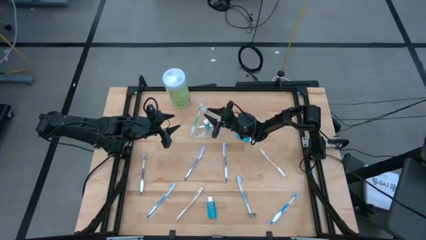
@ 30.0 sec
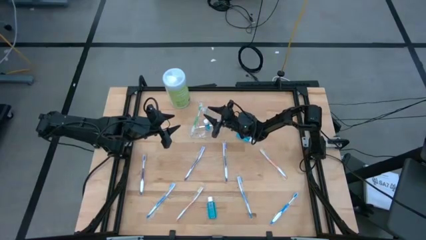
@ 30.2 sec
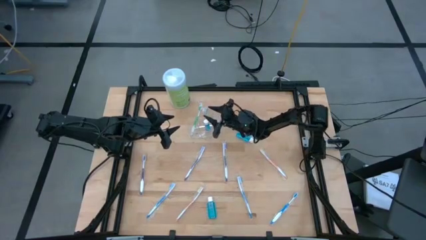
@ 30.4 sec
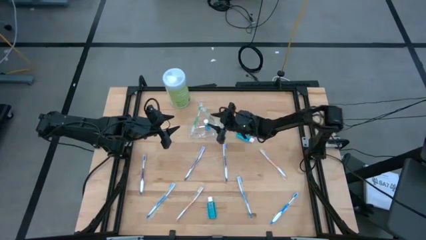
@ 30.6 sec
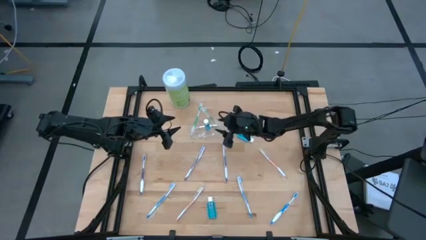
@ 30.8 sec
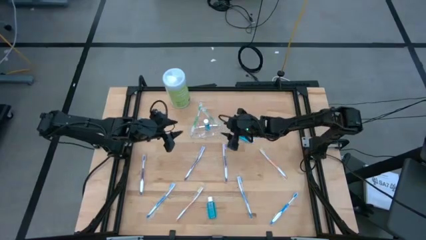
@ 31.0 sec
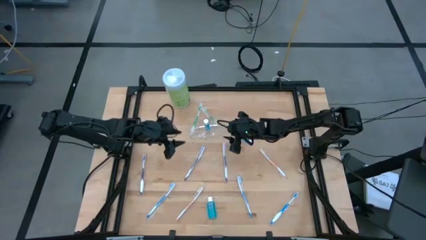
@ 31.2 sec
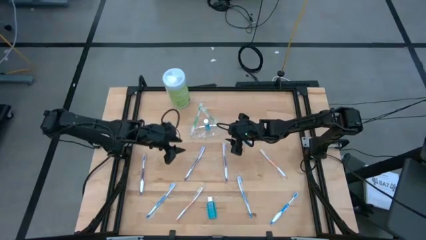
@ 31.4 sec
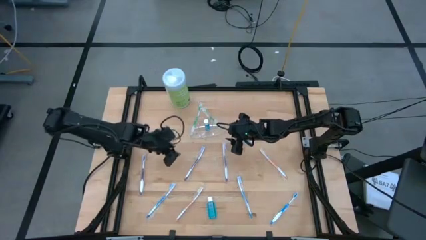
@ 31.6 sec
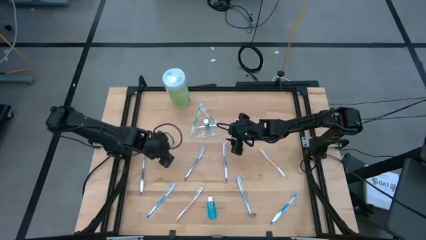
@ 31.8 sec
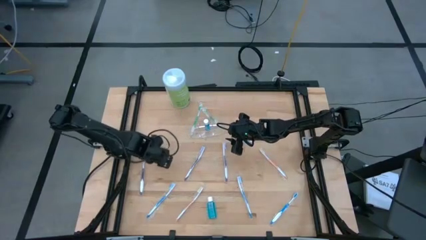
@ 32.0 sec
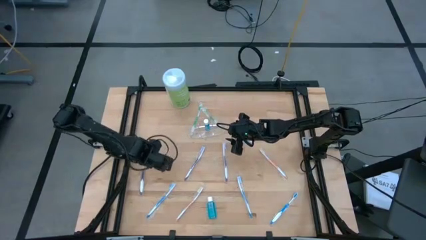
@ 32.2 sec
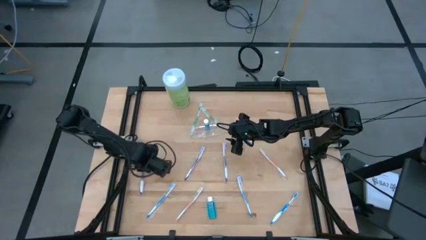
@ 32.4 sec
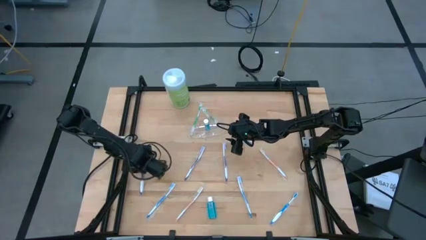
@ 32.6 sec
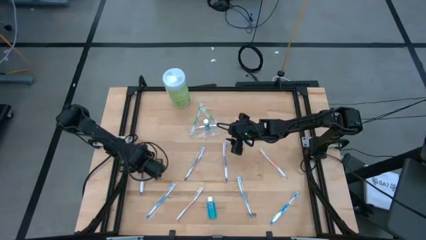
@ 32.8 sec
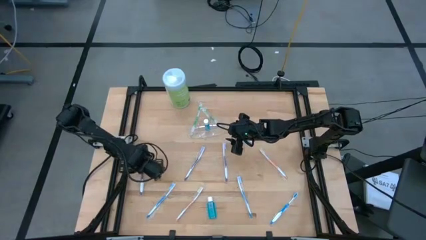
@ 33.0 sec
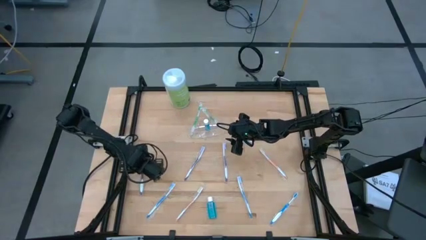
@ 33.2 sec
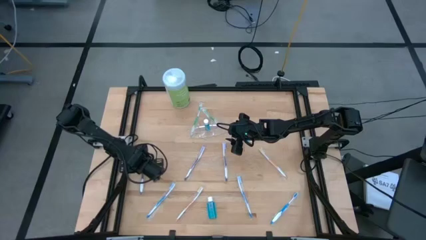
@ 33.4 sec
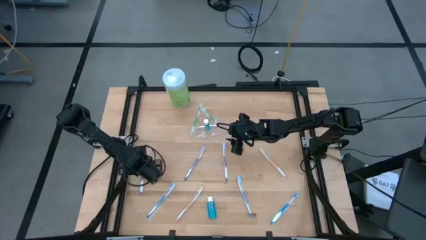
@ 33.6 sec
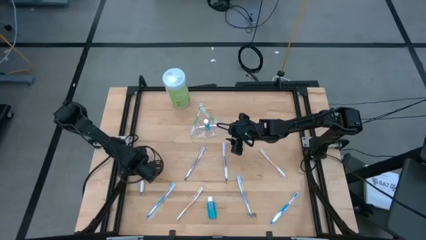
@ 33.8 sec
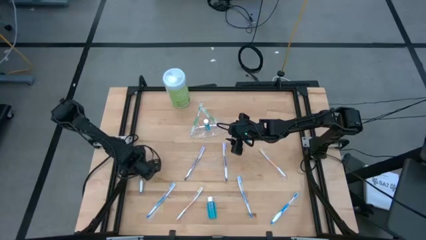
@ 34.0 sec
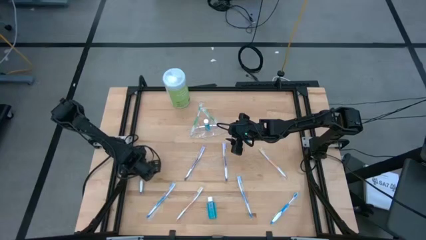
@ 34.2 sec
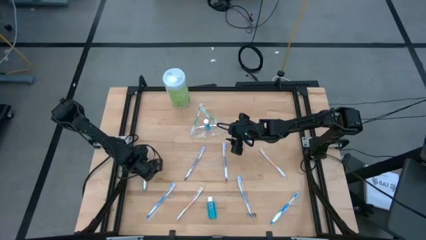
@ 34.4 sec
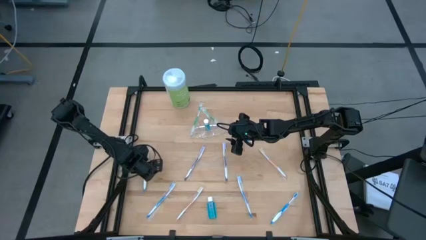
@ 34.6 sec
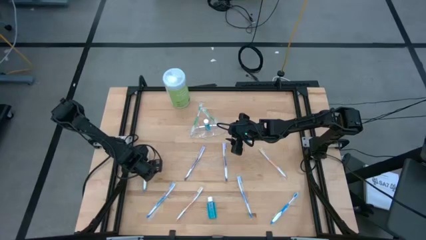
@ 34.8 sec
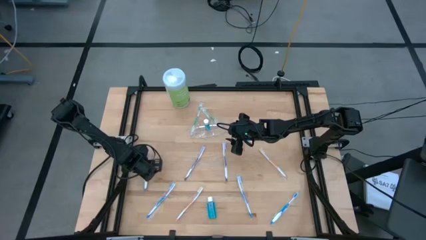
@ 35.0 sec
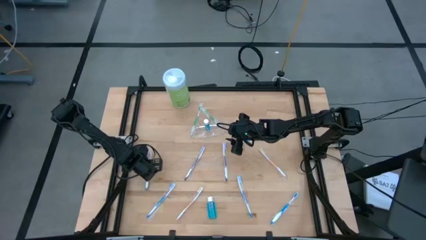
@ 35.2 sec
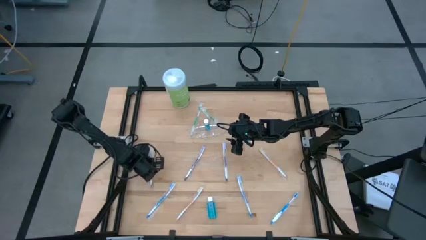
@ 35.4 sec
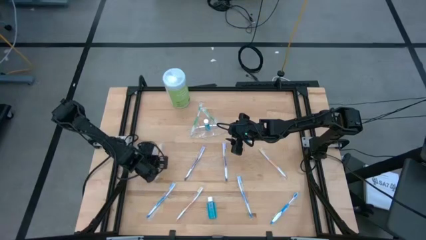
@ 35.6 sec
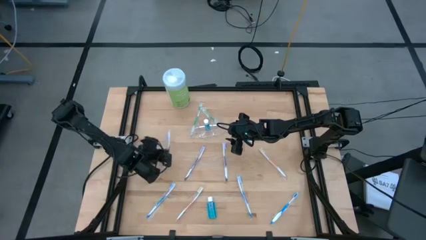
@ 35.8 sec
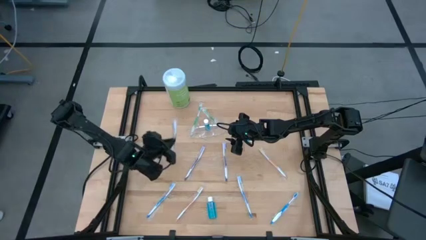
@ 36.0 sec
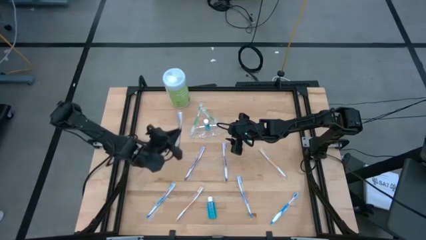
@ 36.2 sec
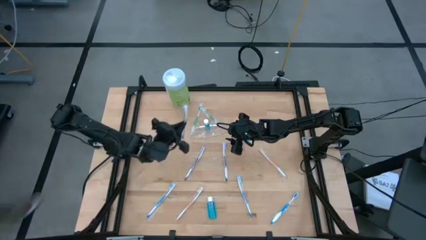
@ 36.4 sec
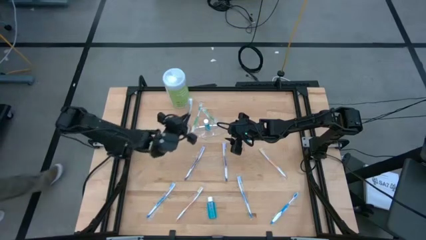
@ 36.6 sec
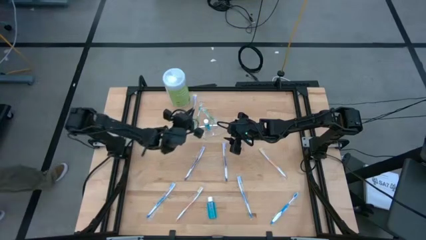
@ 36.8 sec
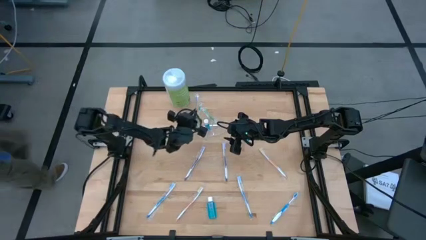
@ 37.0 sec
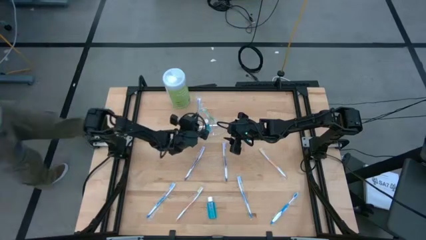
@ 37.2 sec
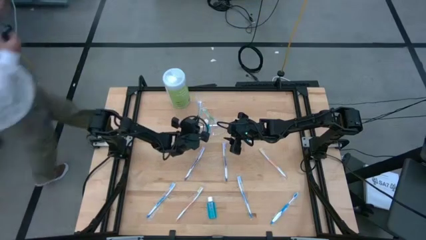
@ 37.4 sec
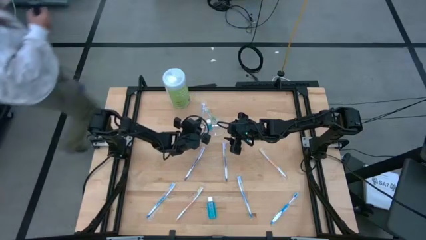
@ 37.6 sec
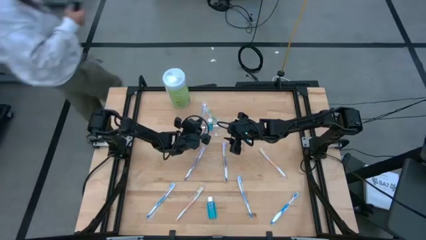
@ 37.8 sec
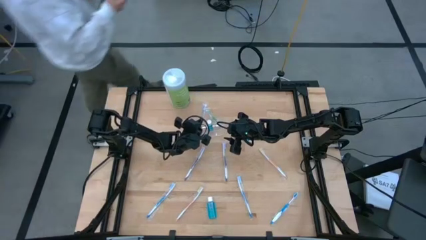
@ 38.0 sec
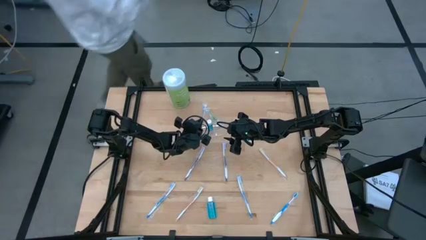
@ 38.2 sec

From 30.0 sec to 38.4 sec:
Task: Pick & Place toothbrushing station
Put the left violet toothbrush into the transparent organizer

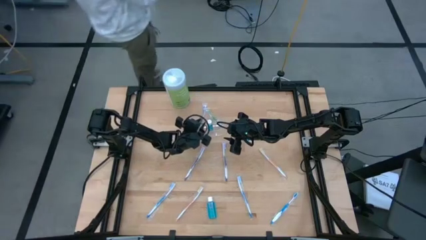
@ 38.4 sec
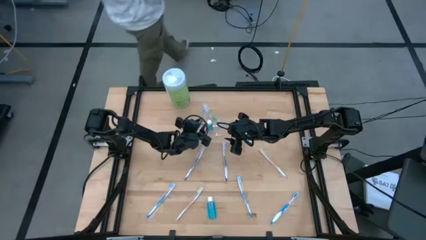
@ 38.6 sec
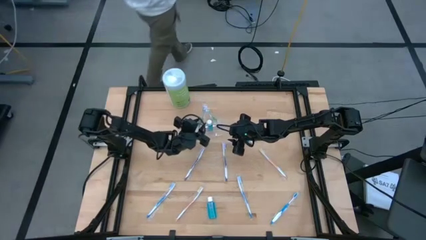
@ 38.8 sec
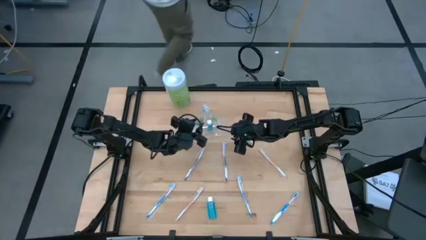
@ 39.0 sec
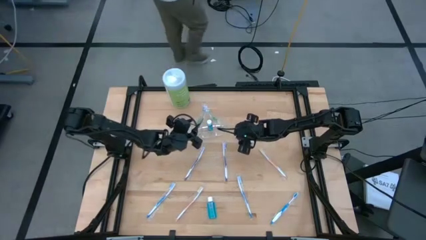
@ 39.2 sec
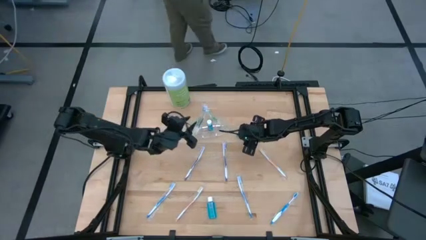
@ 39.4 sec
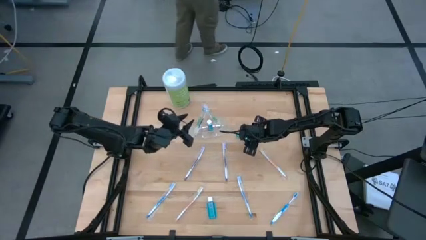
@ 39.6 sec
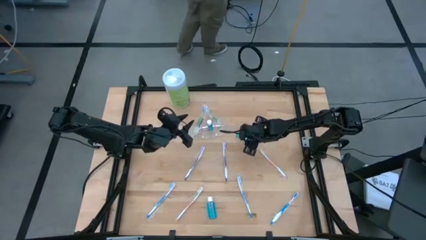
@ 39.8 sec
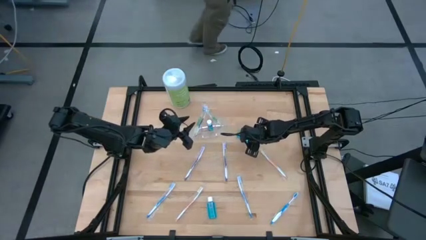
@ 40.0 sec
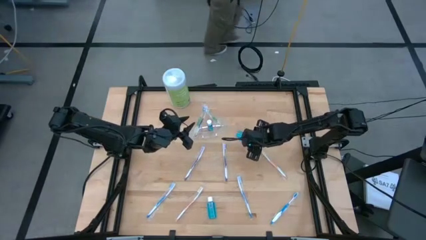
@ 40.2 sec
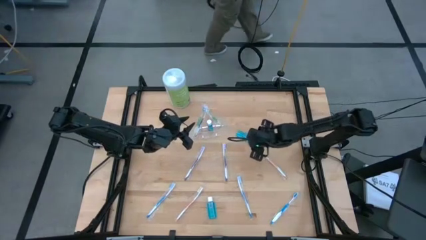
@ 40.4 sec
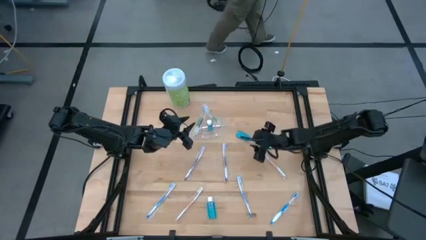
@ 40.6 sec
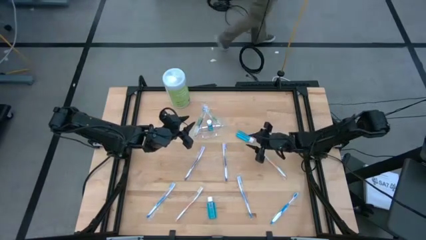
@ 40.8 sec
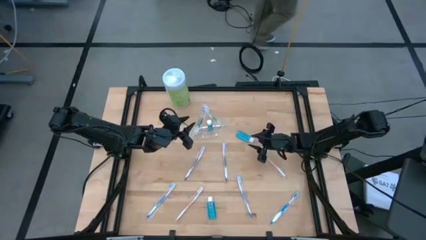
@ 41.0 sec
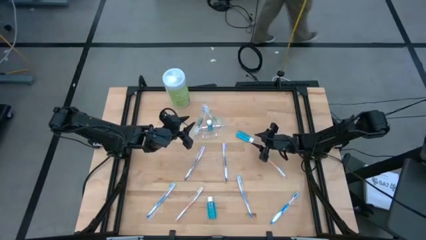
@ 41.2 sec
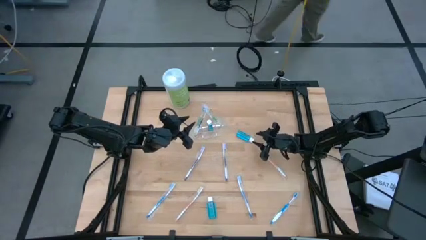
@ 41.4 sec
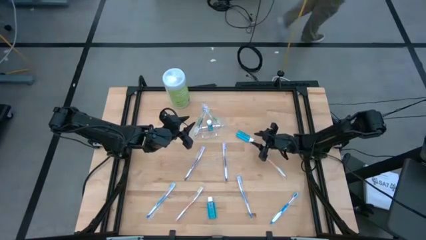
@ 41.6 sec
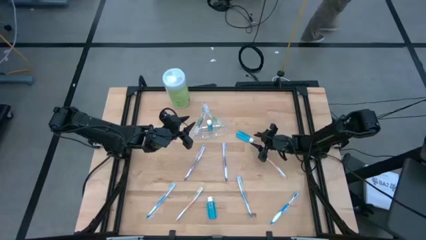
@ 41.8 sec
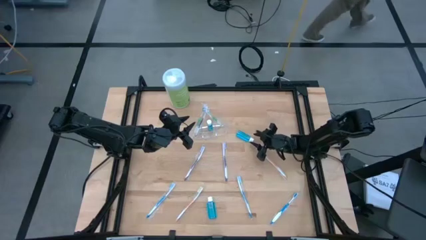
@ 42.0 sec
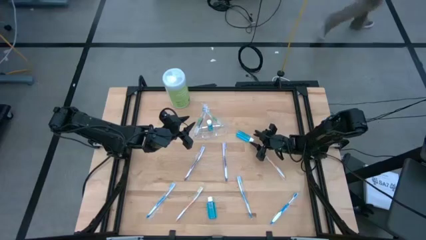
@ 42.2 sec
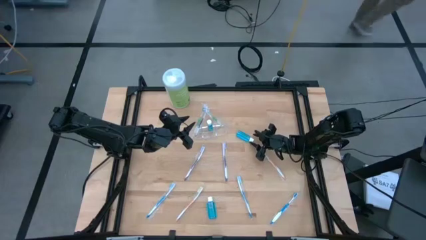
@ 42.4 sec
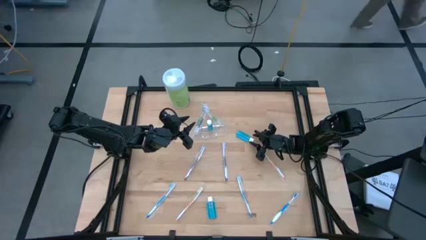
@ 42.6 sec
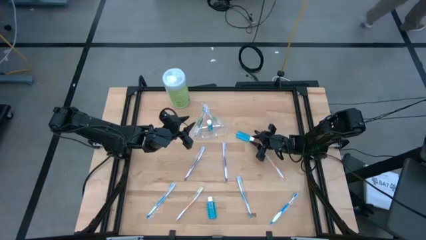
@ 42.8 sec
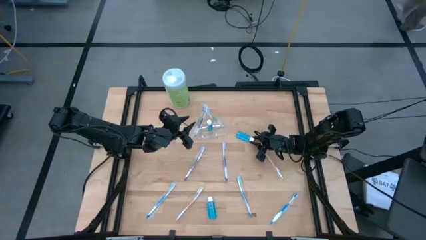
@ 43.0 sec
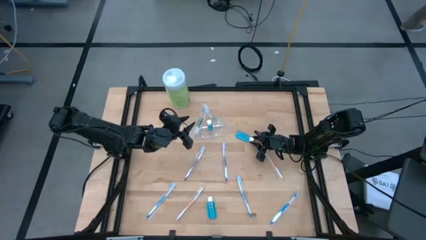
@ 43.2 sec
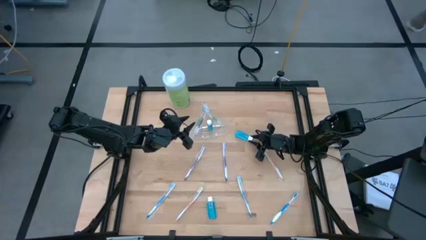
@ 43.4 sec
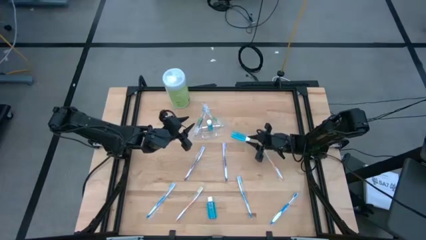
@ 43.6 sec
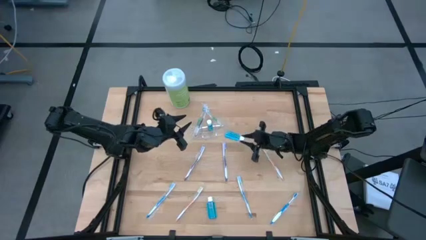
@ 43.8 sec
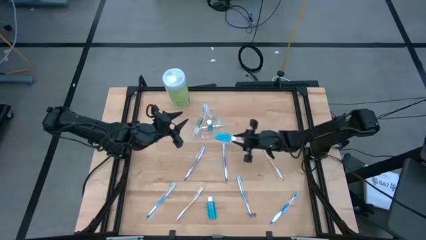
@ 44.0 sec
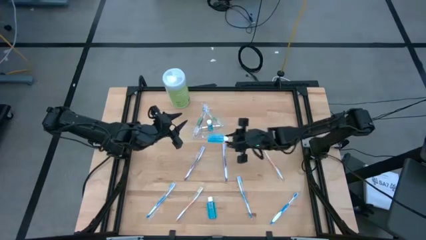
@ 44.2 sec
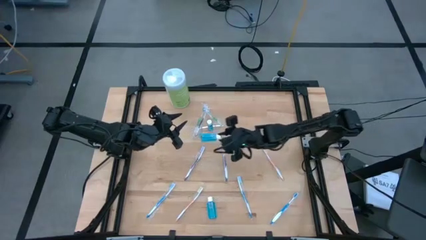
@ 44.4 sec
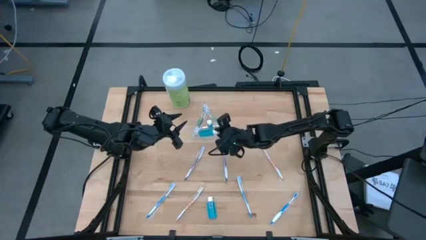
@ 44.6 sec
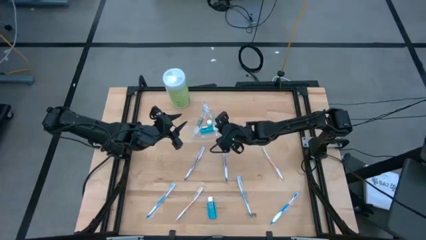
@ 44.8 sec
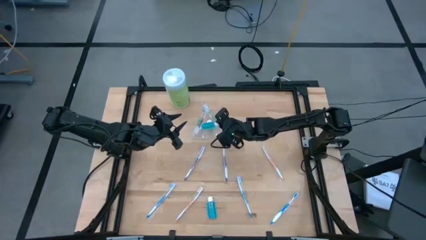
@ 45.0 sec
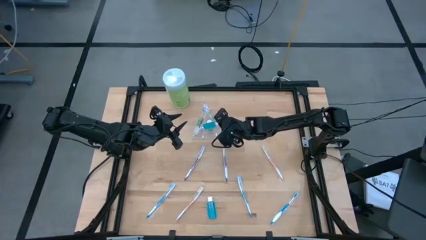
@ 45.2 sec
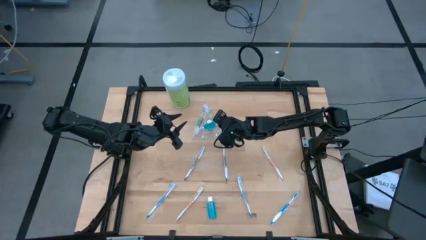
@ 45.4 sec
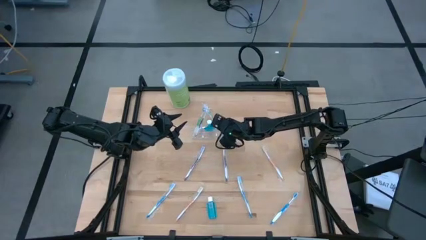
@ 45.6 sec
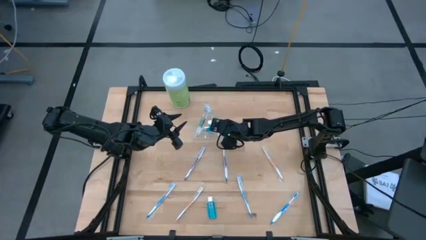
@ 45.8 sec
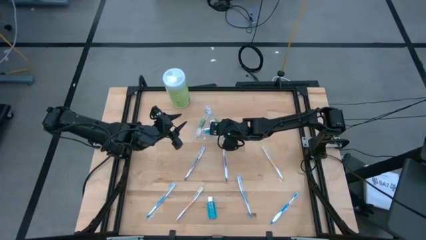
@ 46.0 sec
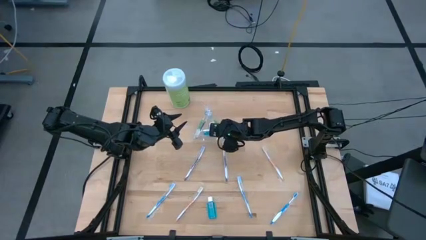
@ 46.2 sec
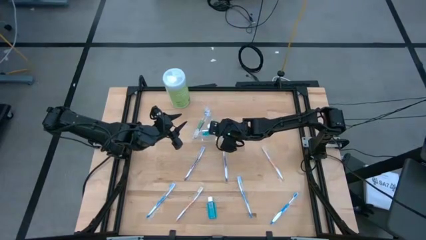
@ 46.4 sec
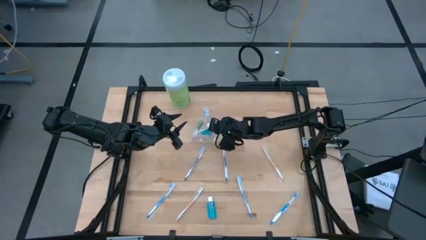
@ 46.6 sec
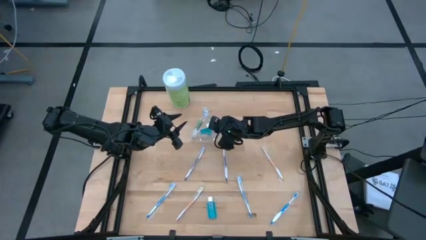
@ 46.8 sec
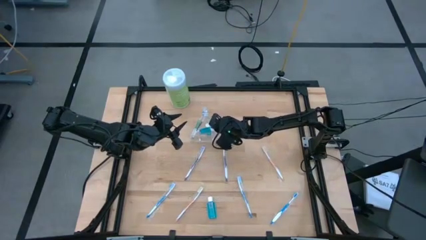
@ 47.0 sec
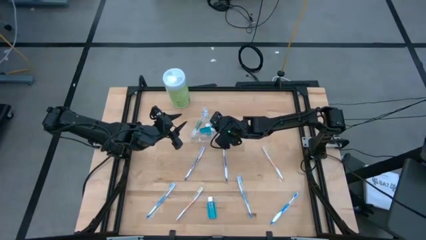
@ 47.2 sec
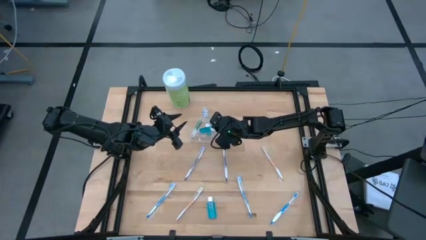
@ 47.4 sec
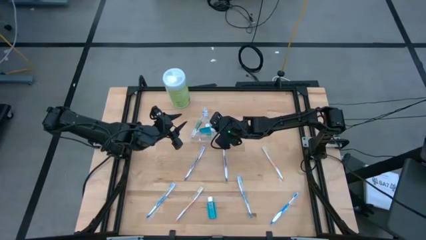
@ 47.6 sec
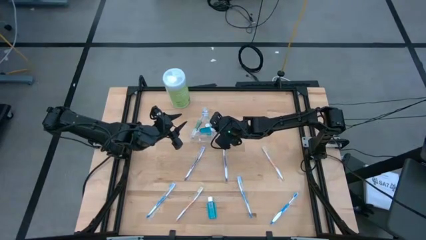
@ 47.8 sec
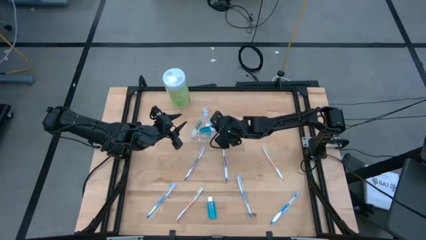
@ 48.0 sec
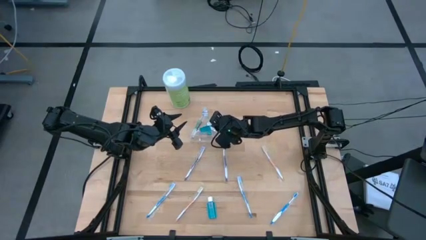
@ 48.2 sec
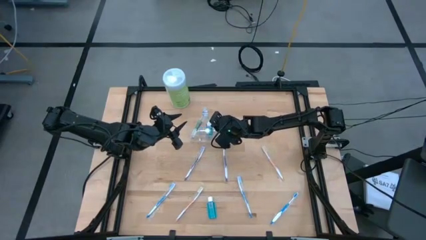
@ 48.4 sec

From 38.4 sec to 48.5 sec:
Put the top mouthwash into the transparent organizer
